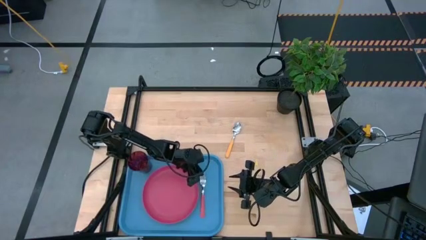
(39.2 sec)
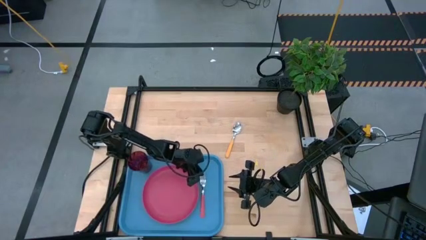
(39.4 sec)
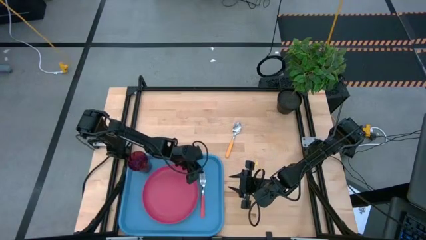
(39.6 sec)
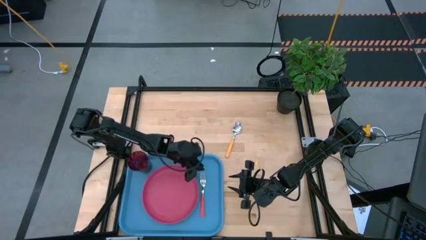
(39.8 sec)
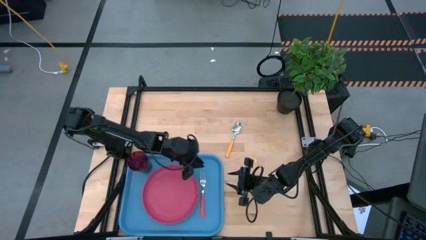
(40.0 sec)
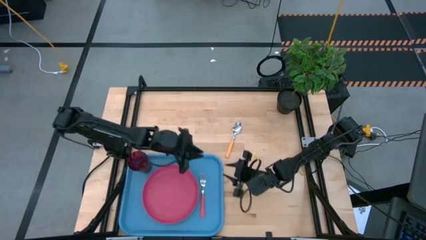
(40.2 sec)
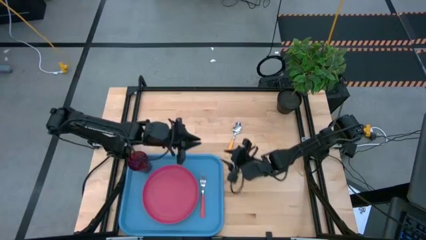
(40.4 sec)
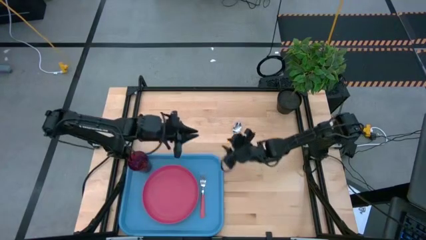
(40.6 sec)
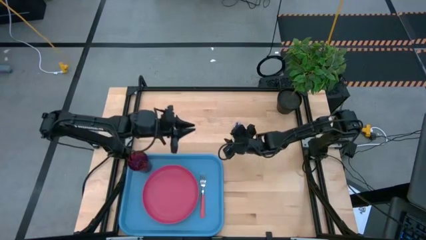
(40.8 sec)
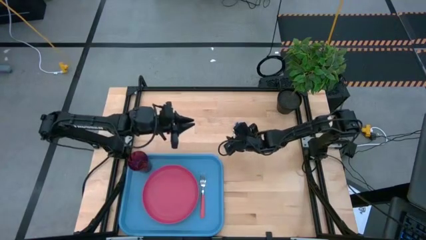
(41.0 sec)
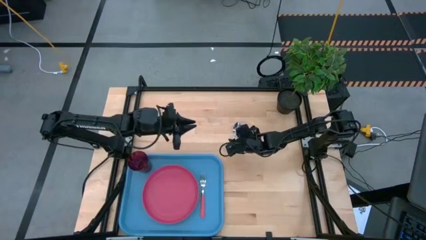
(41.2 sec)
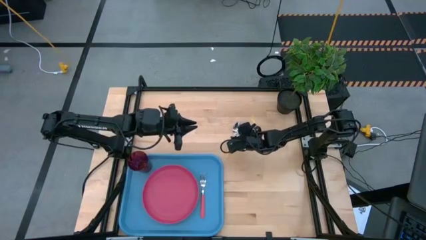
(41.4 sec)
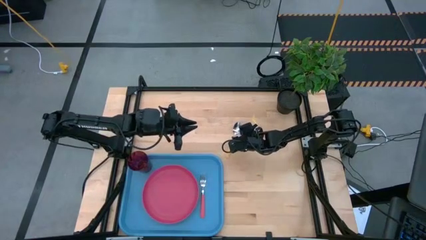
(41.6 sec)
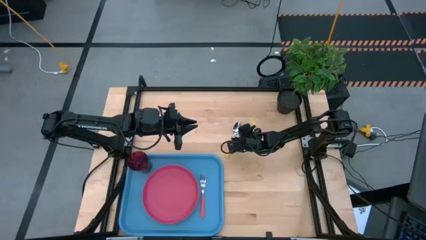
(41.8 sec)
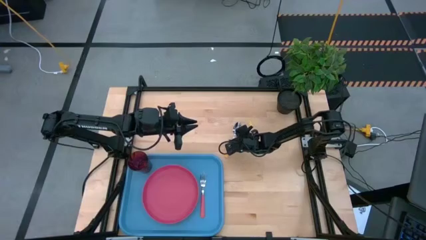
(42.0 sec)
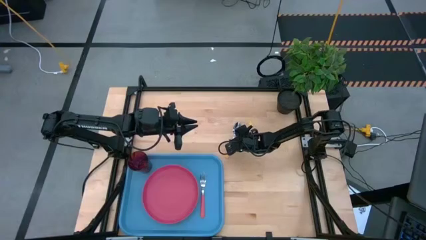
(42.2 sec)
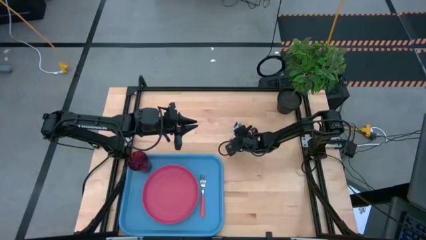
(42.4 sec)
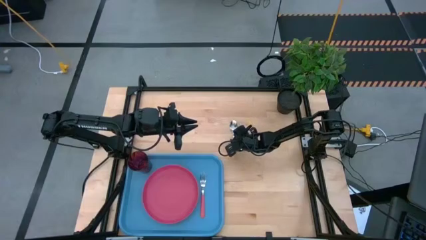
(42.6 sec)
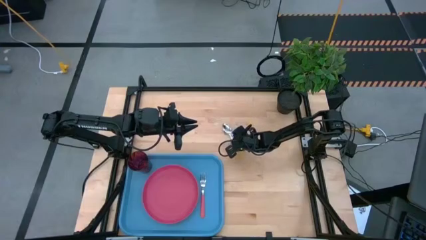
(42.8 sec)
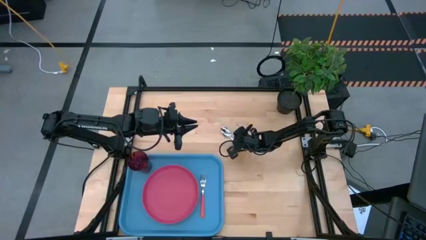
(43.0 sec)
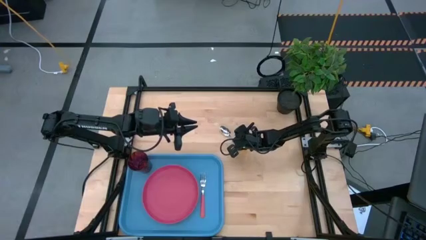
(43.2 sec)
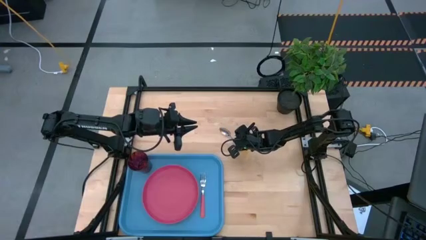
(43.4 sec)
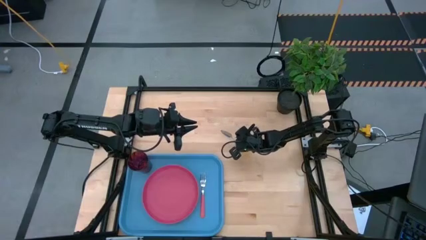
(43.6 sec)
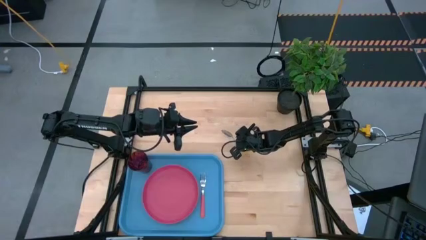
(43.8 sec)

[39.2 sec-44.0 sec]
Task: Pick and place plate/cup/fork/spoon on tray
Put the yellow spoon on the blue serving tray to the right of the pink fork

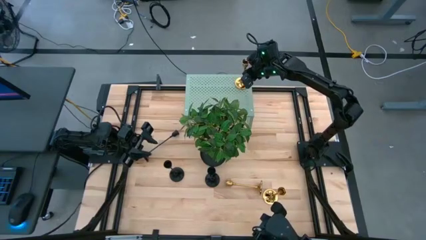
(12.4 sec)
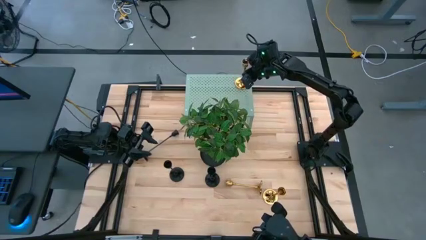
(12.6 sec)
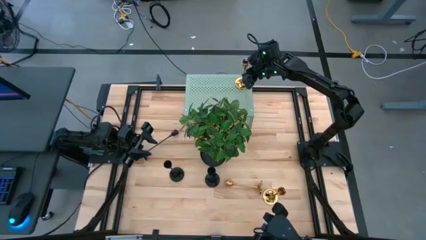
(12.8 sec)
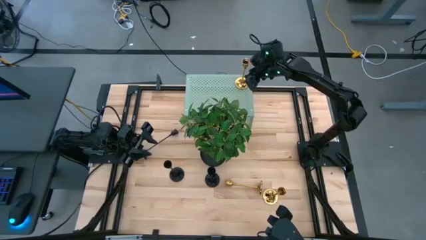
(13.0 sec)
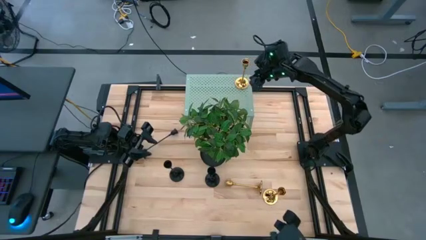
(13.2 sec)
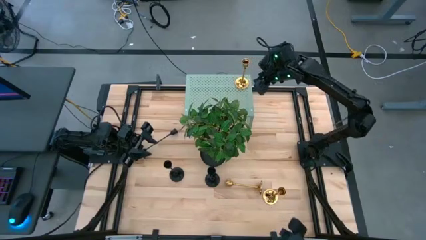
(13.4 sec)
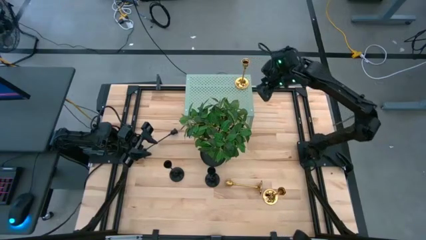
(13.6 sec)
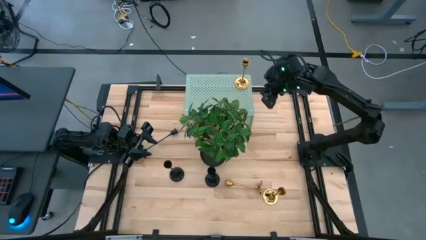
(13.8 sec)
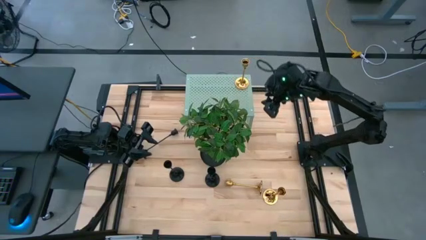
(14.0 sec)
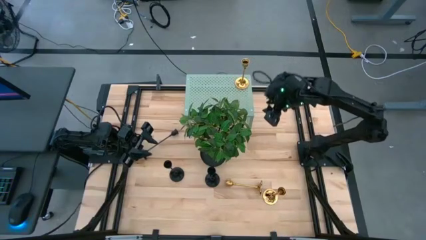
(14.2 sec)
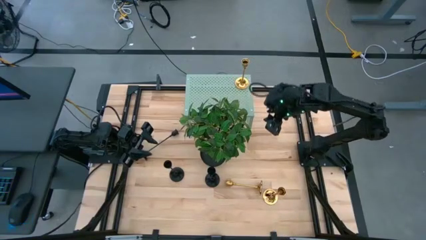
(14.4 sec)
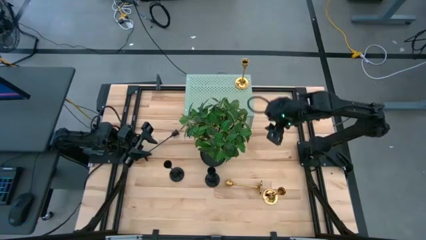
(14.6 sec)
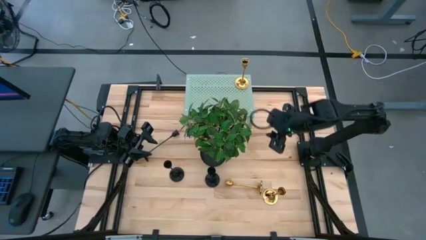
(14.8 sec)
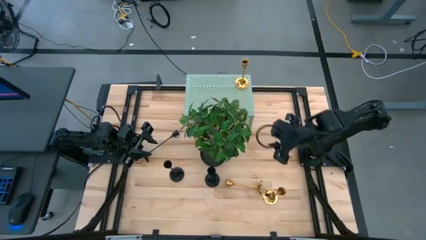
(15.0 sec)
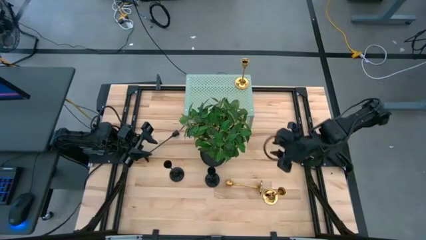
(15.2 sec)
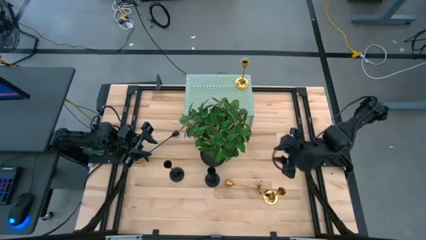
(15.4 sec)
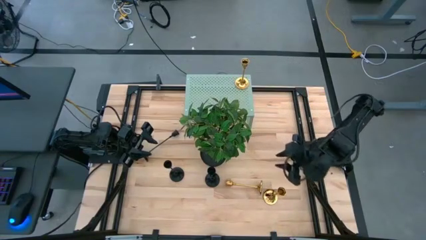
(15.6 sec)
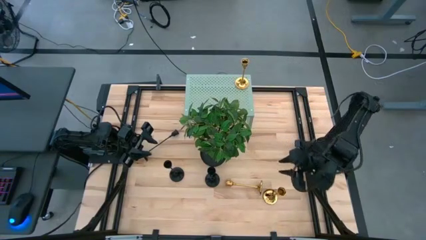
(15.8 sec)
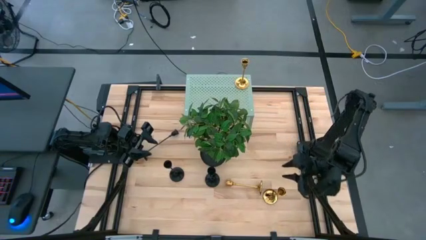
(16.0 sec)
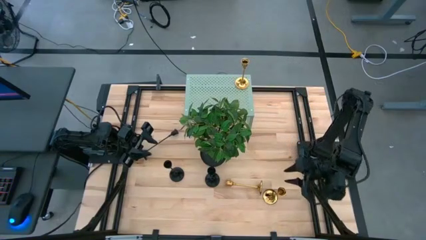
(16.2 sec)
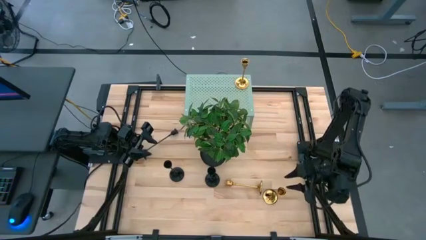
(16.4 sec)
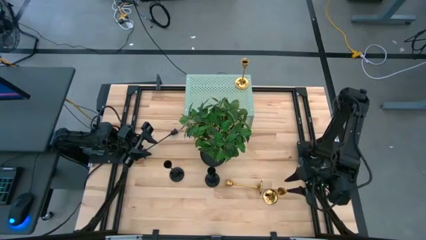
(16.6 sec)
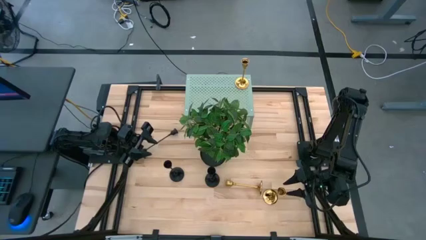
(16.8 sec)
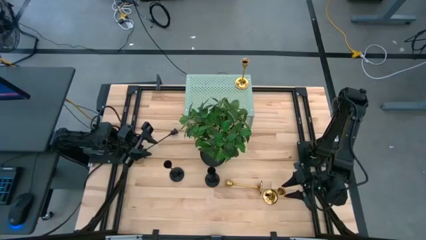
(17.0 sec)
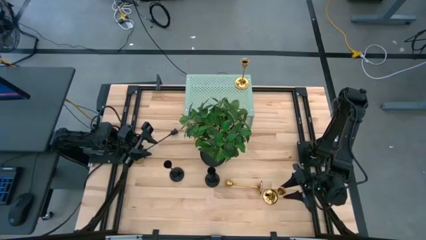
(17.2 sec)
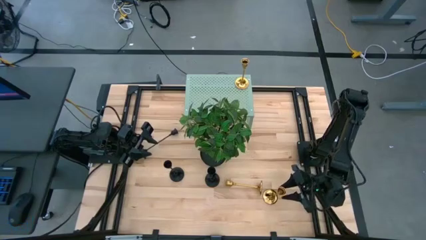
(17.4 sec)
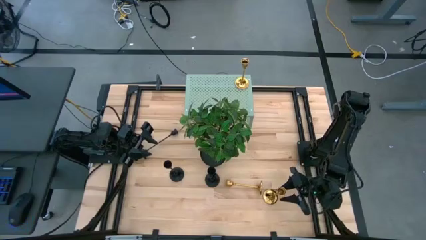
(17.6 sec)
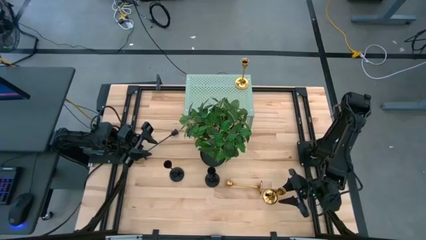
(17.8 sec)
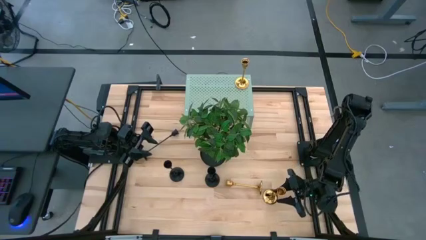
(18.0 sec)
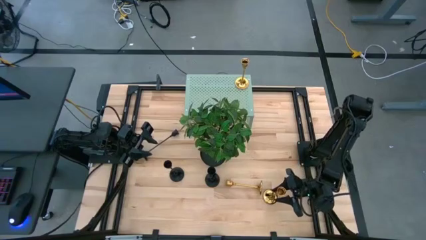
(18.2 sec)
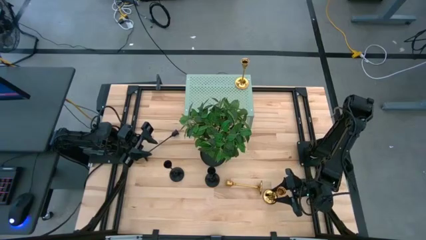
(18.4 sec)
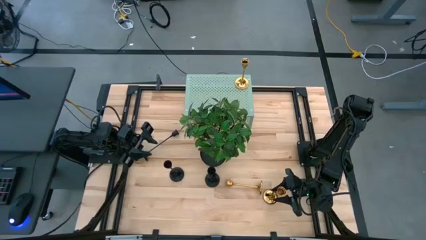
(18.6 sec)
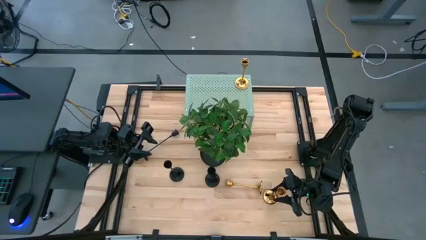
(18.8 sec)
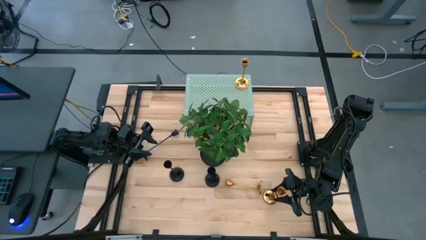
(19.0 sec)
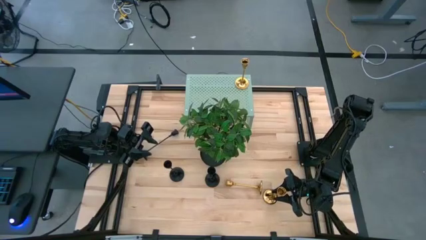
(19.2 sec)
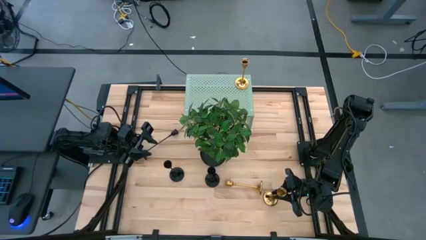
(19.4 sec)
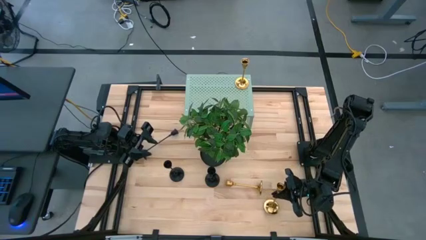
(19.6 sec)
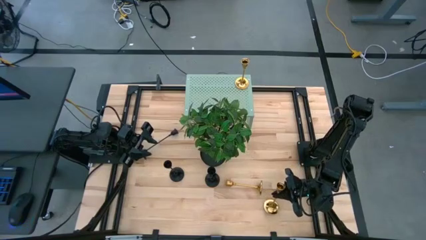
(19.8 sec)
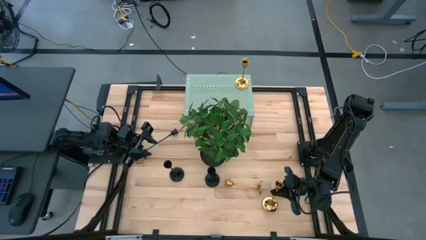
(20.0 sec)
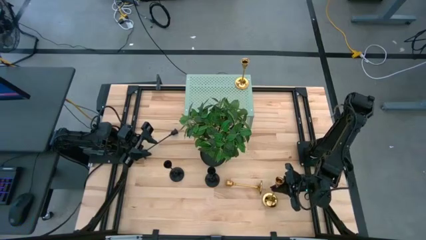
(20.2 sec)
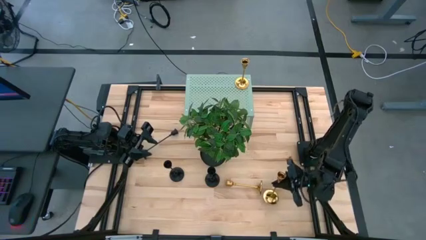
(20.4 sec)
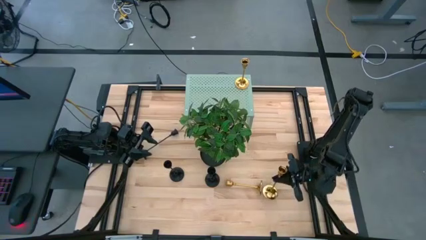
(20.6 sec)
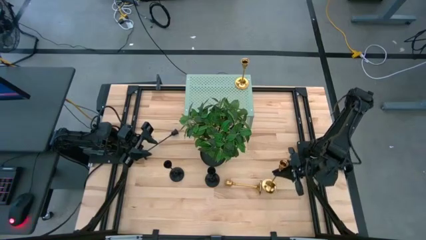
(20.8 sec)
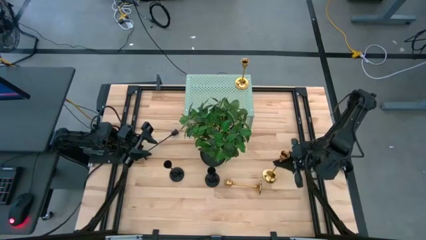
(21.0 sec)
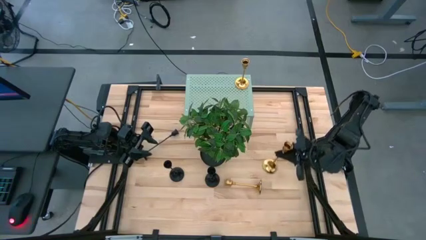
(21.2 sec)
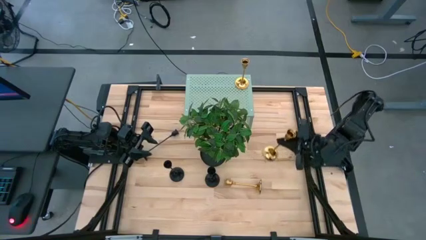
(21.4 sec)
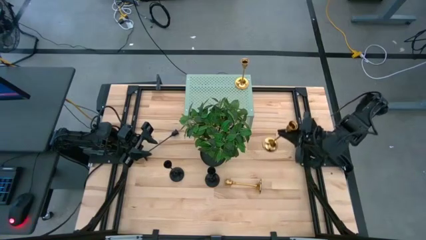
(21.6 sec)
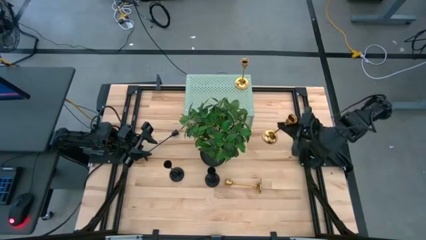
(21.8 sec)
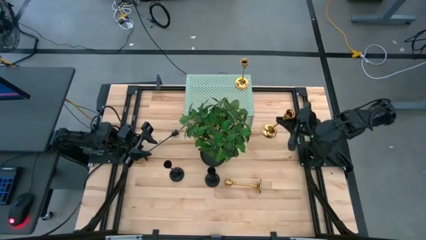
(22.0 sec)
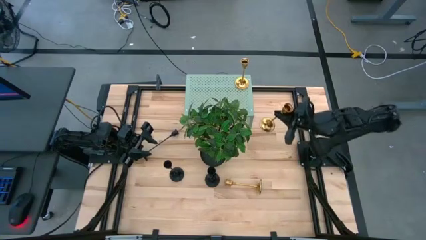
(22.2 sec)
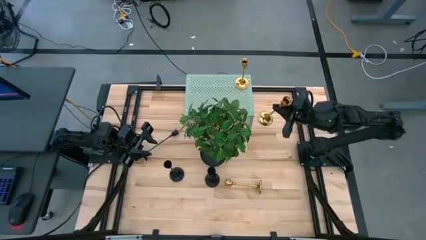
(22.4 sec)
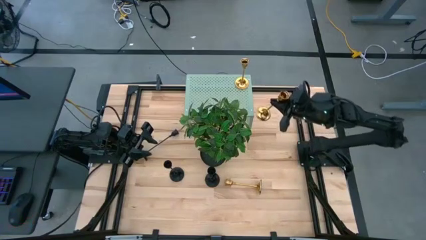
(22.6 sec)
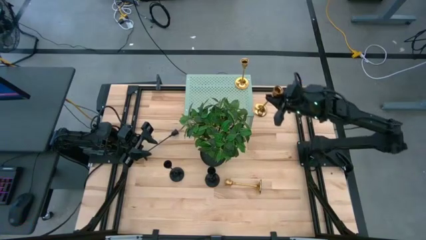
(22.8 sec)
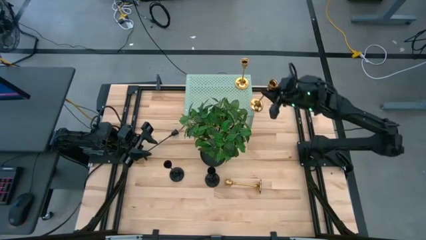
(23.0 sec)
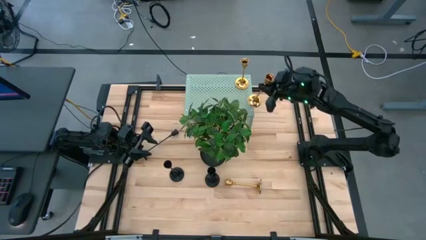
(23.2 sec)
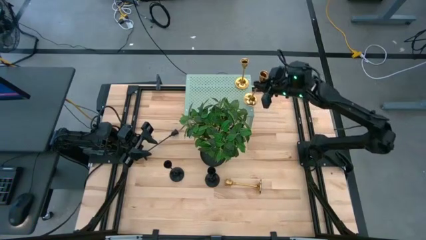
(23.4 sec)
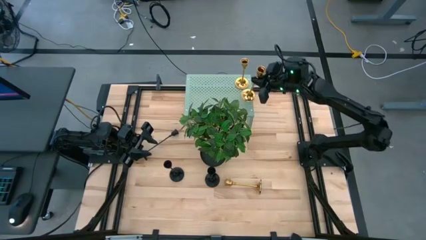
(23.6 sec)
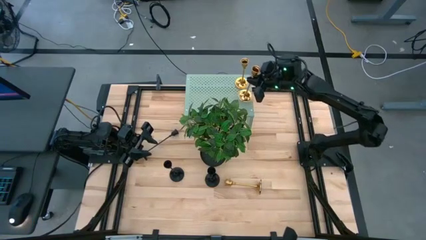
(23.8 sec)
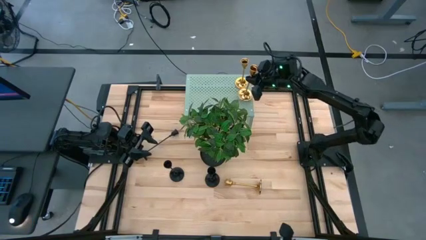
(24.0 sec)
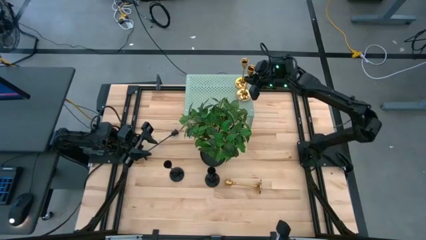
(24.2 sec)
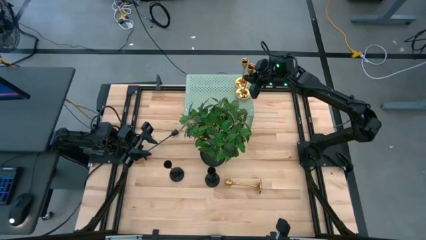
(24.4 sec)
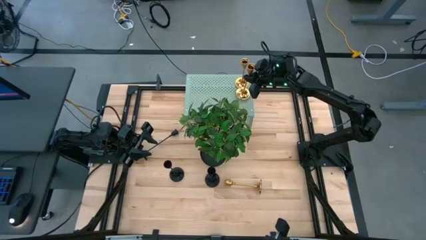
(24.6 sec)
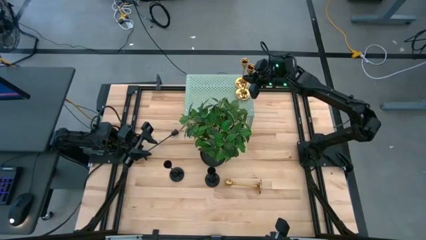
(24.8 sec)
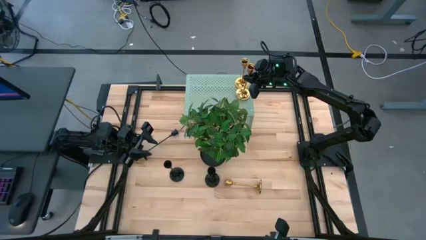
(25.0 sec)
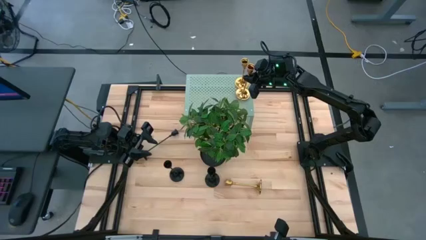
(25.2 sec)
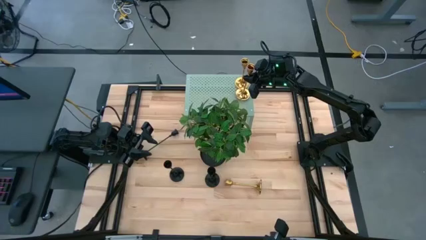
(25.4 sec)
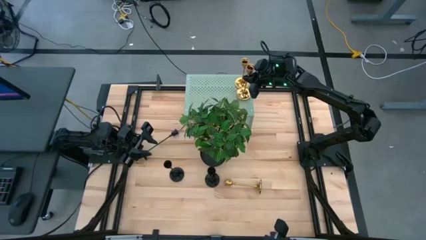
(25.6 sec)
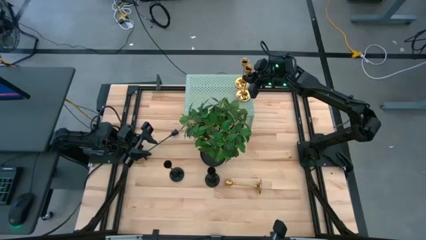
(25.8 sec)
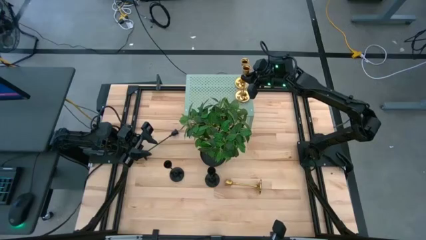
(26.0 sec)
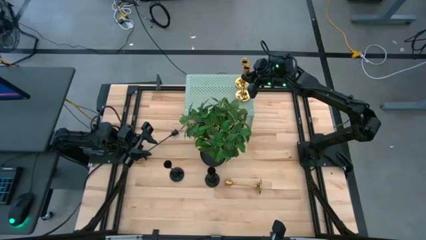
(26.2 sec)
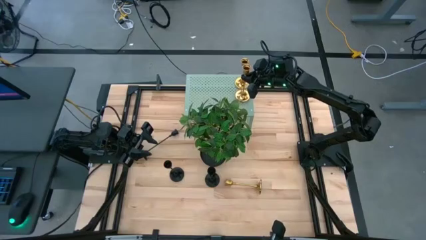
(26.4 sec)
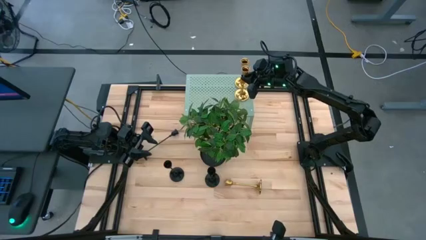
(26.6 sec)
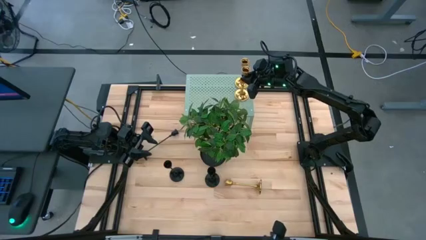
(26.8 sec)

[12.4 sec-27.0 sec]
Task: Pick & Place candle stick holders
Put the right gold candle holder on the shelf aligned with the other gold candle holder
